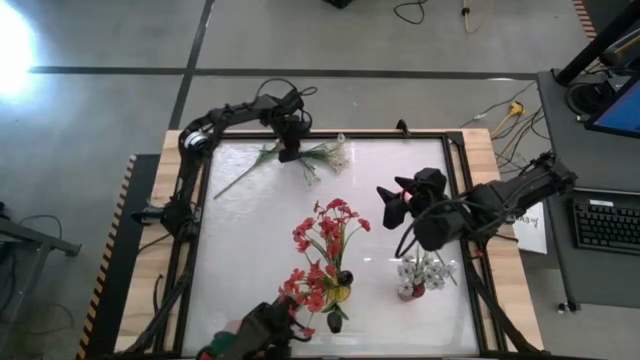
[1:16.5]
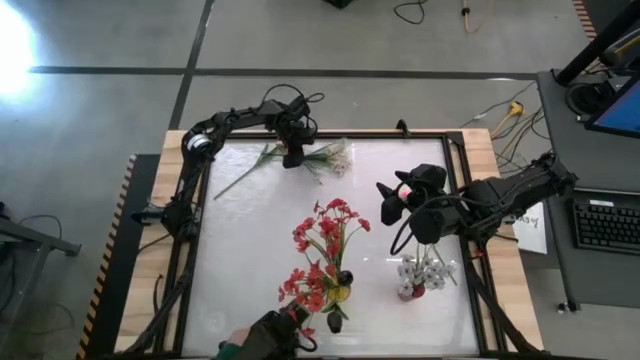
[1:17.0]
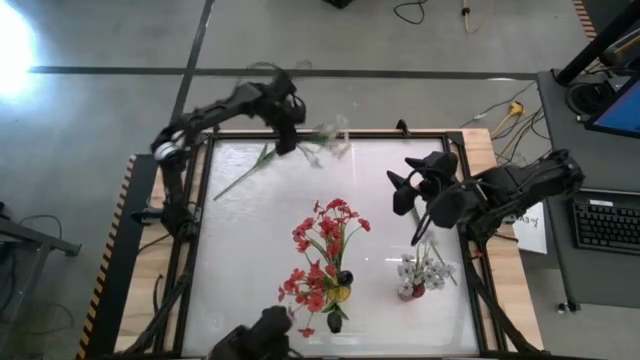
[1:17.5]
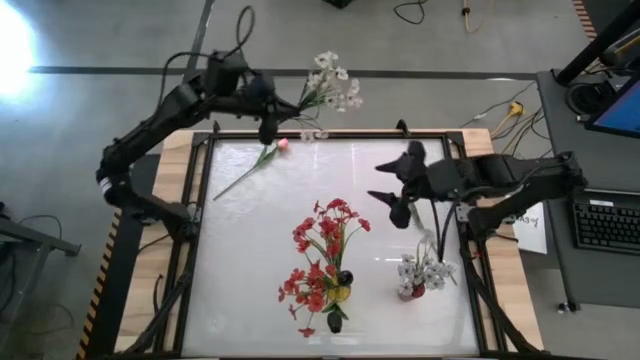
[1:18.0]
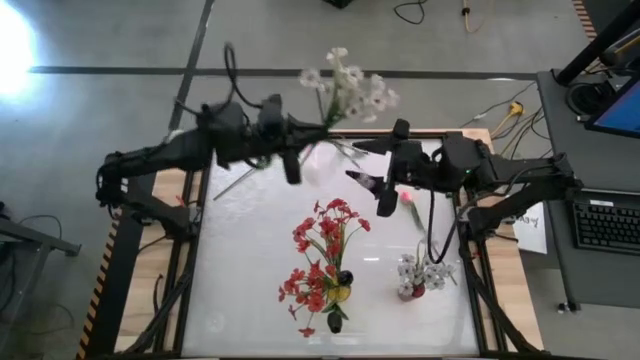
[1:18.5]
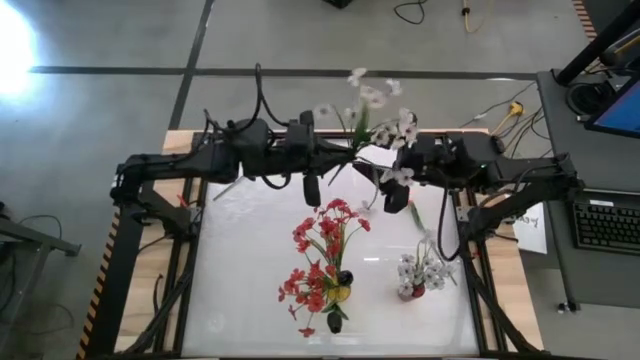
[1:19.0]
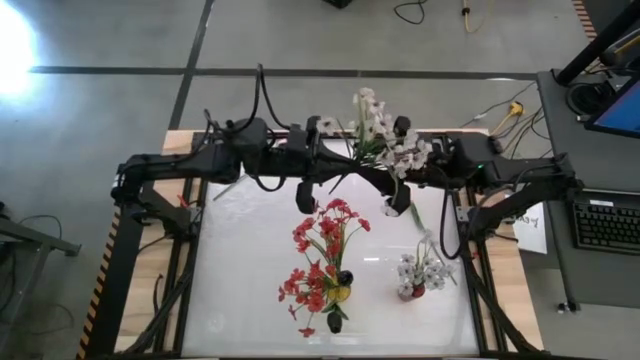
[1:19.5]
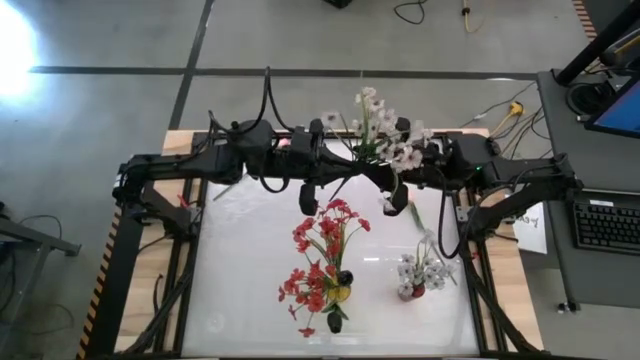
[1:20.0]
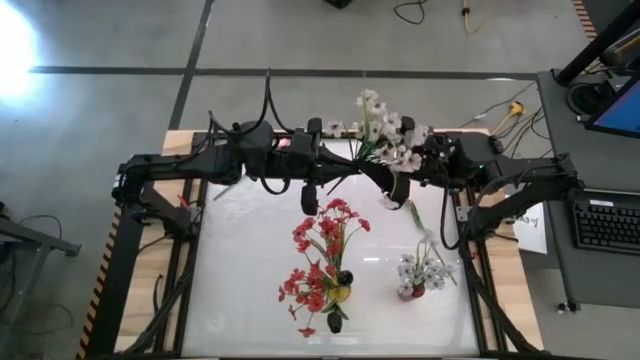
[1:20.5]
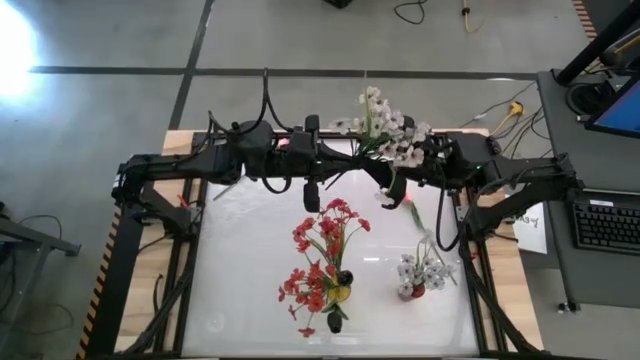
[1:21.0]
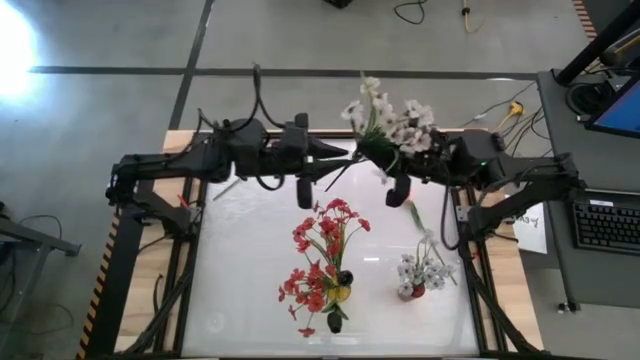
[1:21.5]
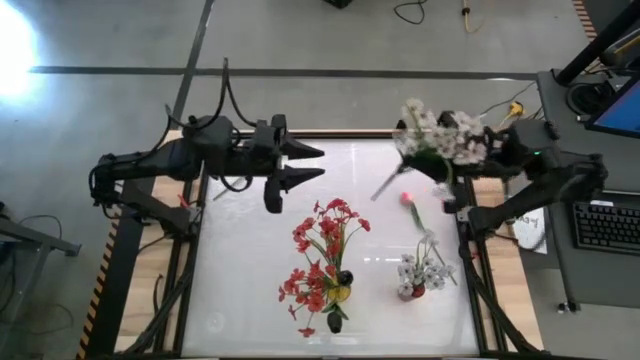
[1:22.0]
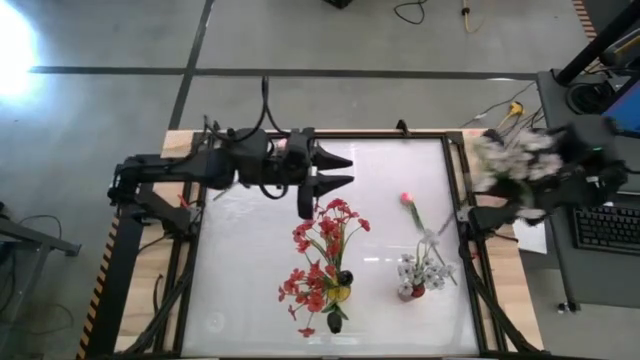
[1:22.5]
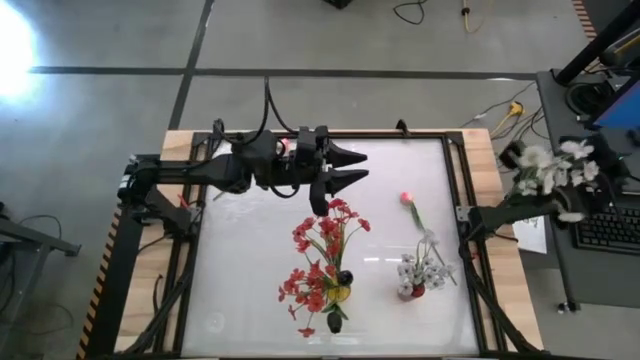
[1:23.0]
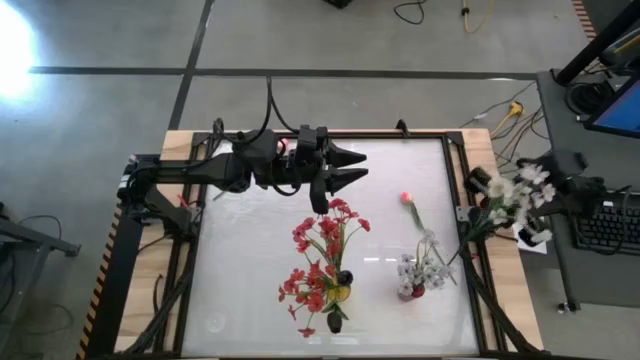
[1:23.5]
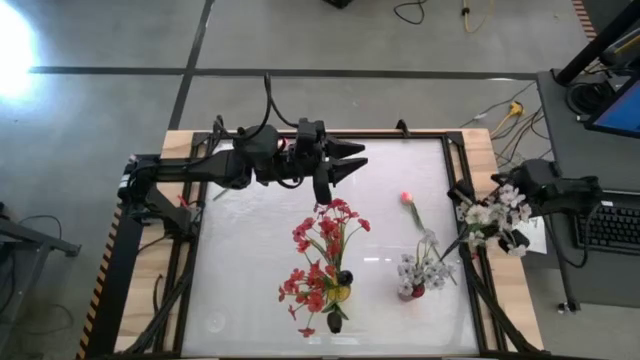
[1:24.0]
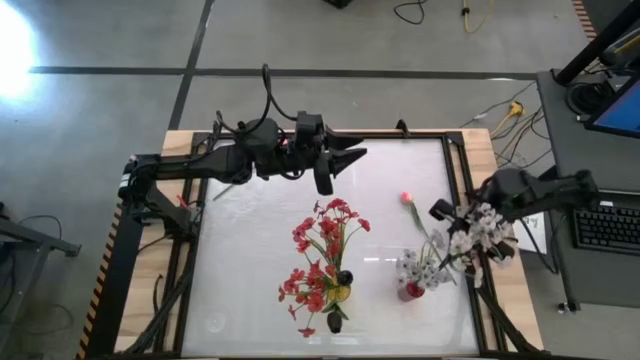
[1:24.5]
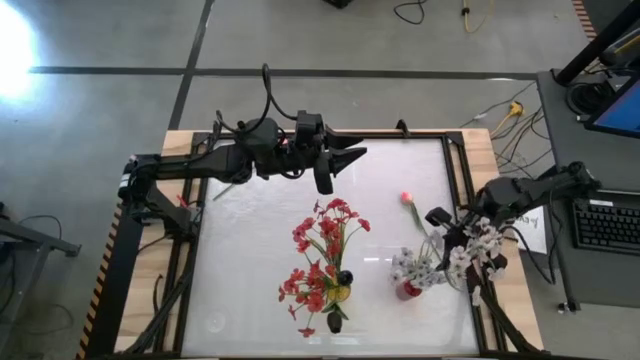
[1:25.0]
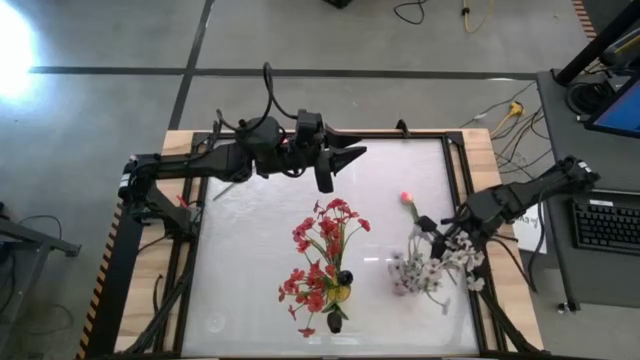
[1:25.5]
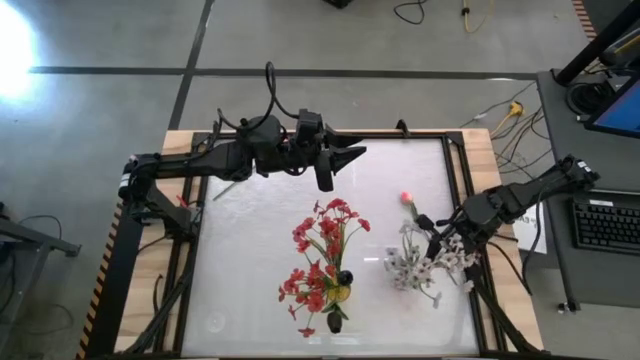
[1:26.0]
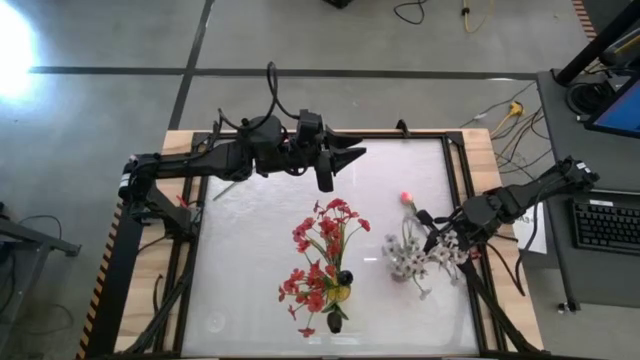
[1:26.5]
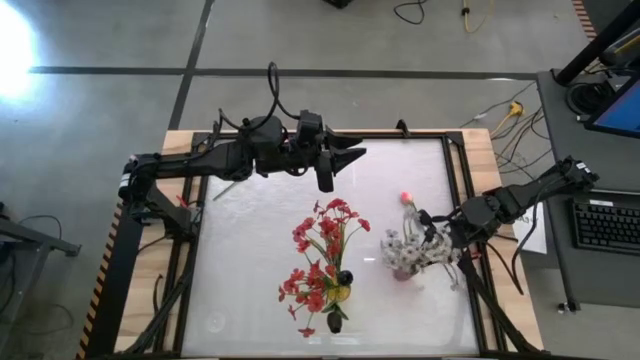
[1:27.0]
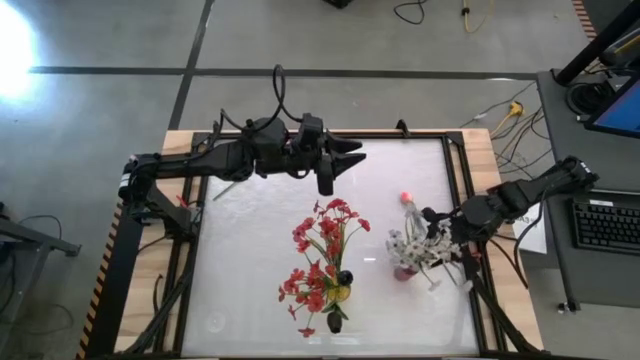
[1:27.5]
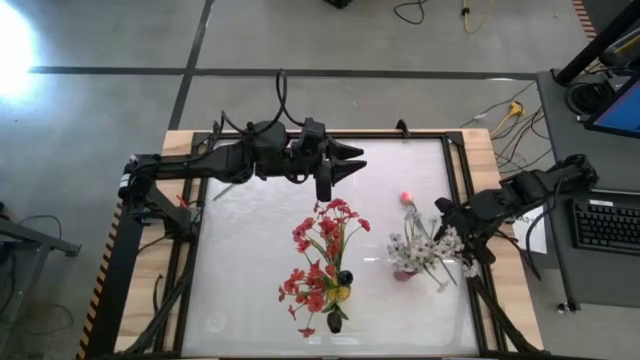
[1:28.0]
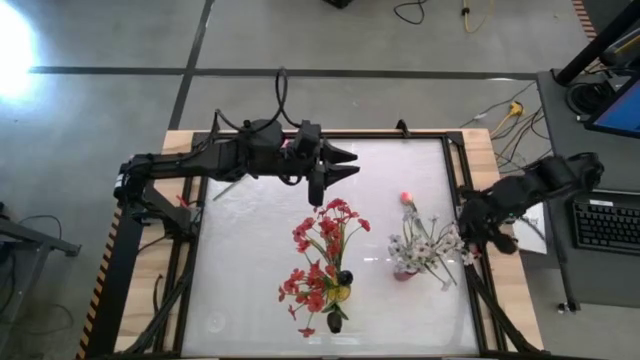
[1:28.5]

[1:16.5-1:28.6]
Task: Sort flowers into vase by color
Put the white flowers into the red vase

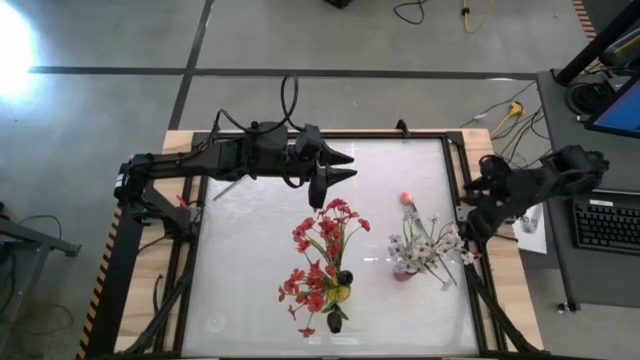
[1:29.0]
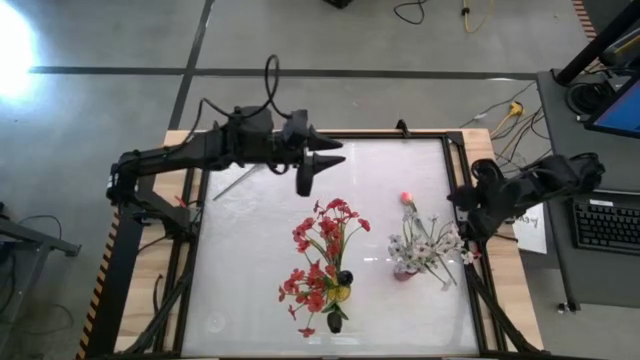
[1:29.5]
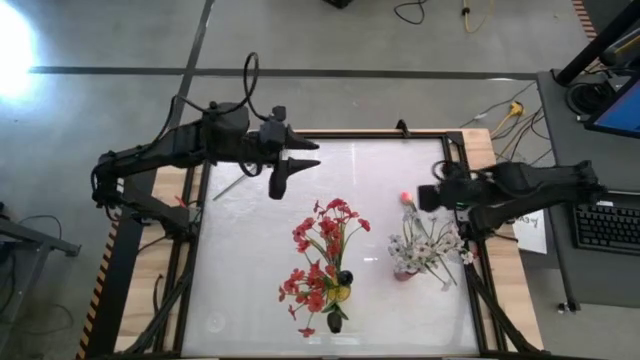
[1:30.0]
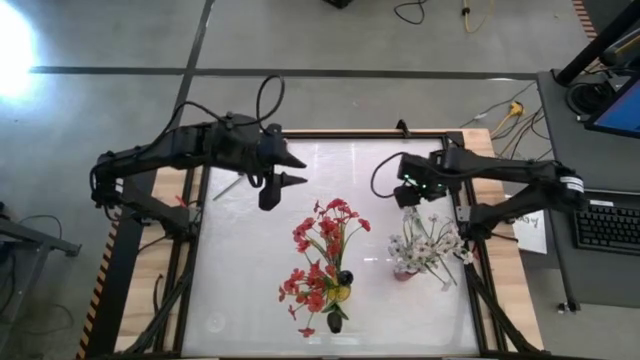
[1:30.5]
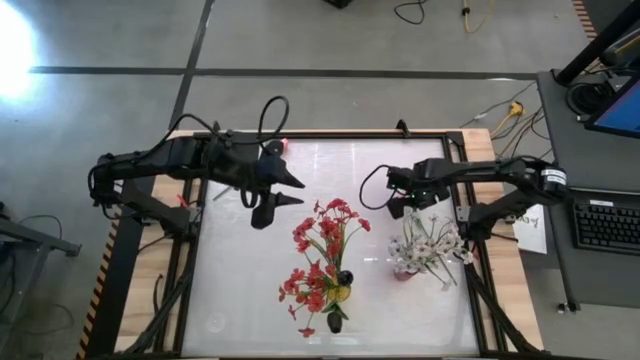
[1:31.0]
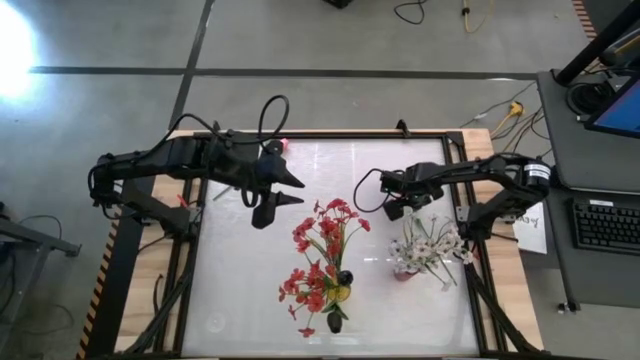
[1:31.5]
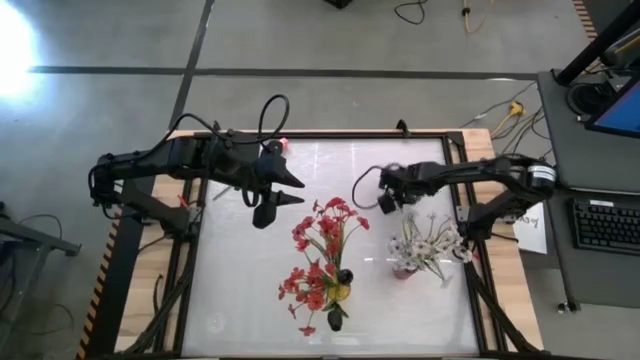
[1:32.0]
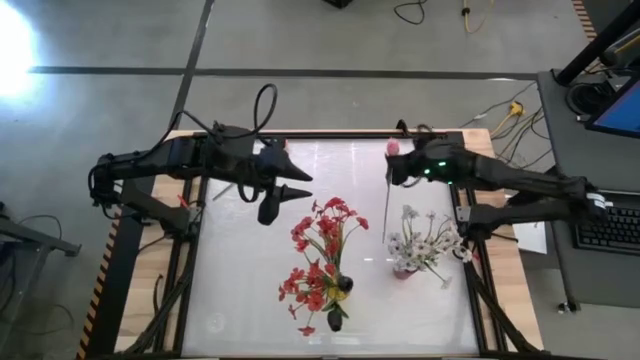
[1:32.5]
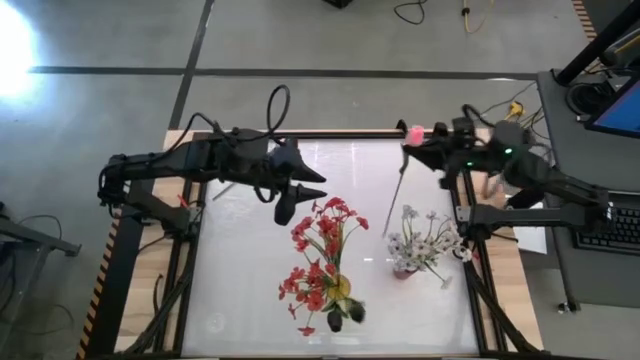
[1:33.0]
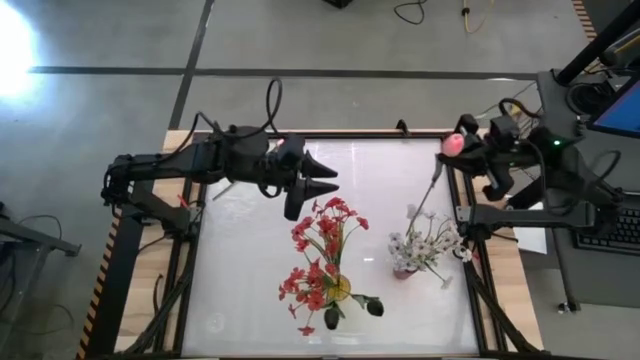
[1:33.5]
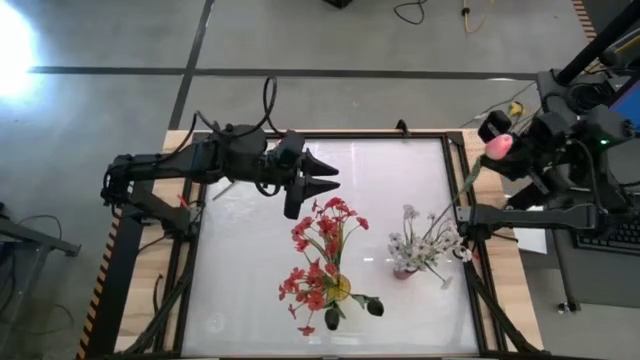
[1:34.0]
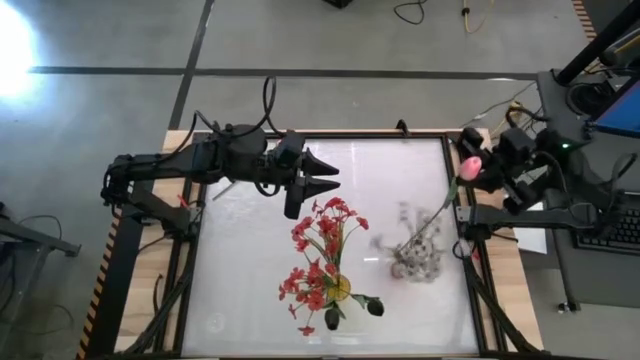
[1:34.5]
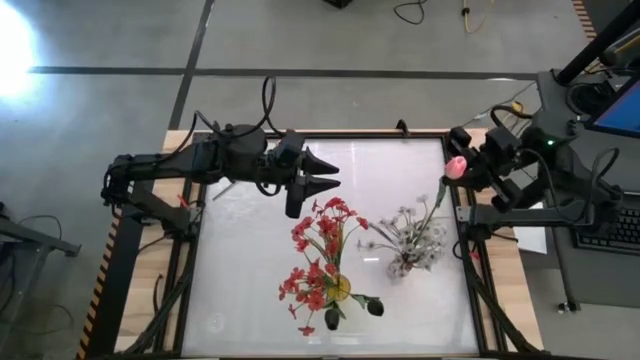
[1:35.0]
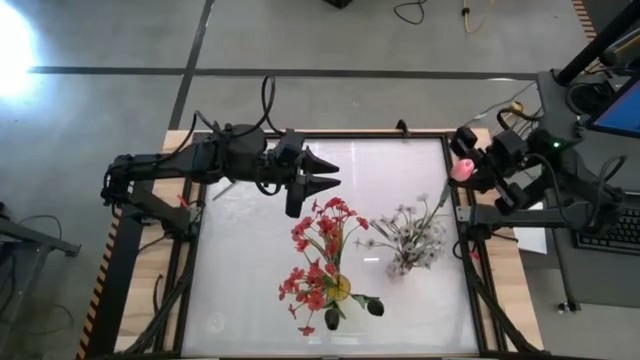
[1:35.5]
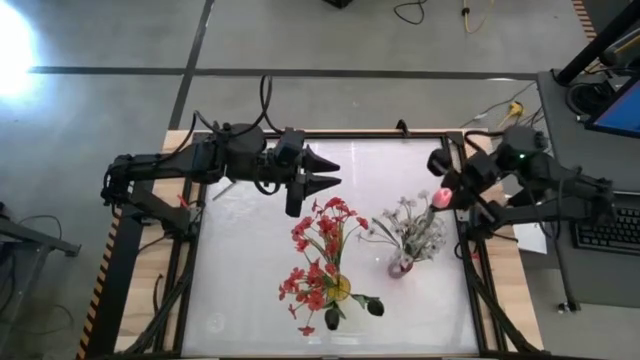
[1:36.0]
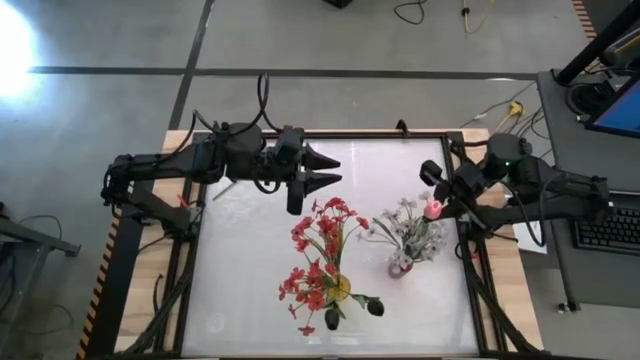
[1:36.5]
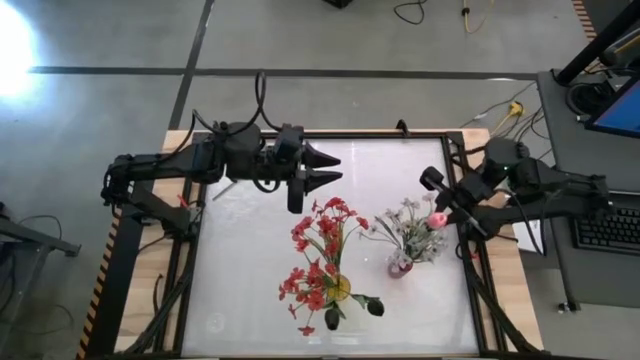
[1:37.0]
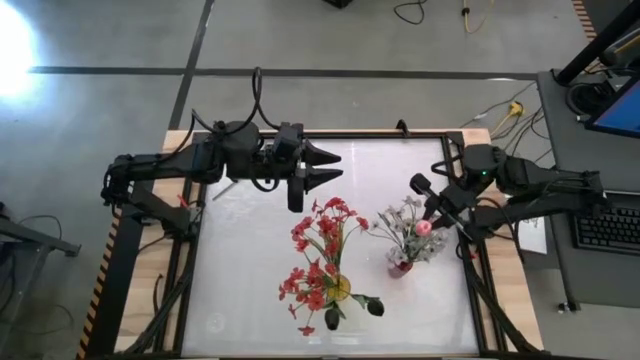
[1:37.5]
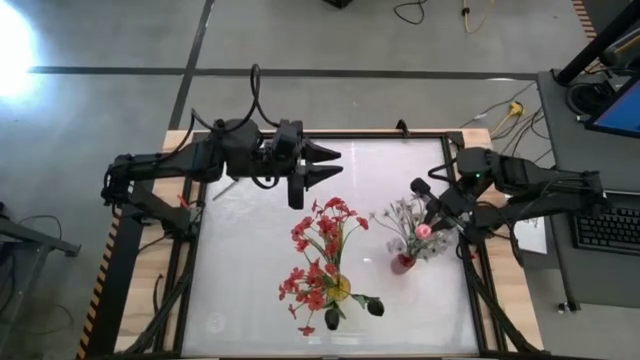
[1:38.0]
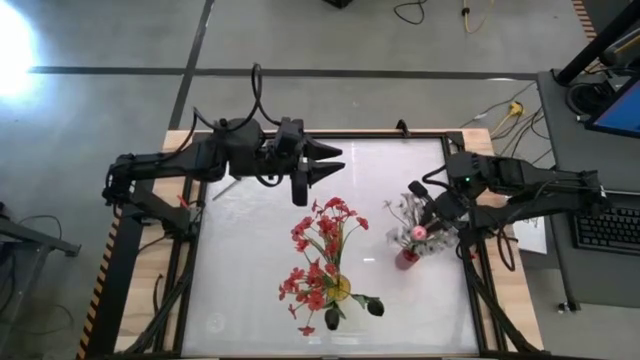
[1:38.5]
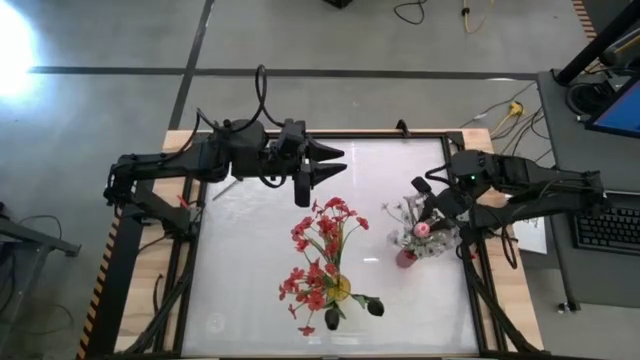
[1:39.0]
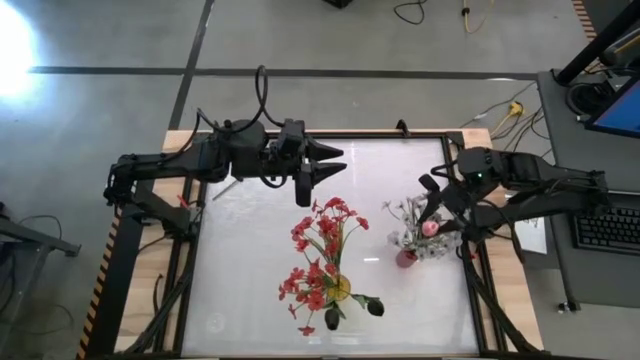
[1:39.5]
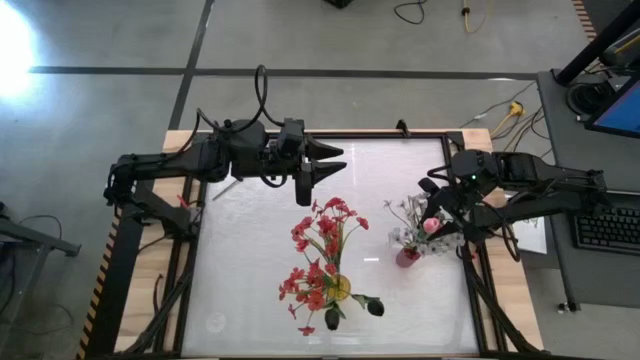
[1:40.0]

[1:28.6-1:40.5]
Put the right pink tulip into the red vase
